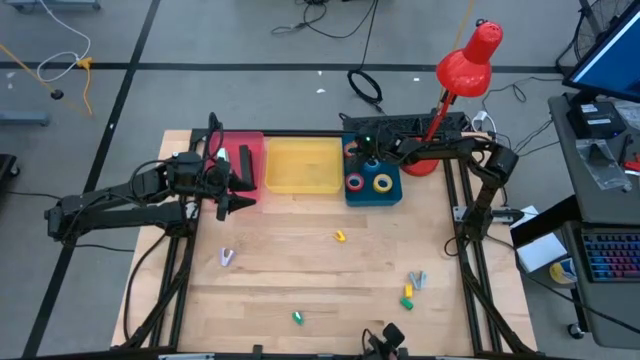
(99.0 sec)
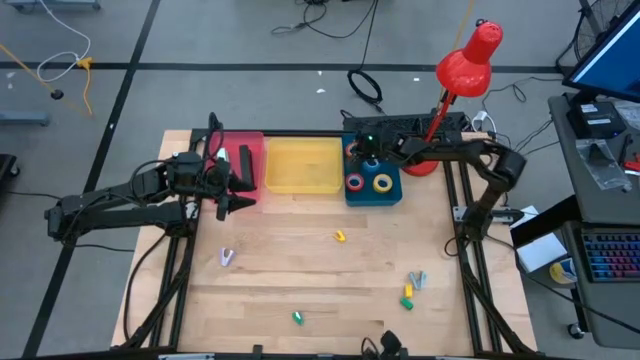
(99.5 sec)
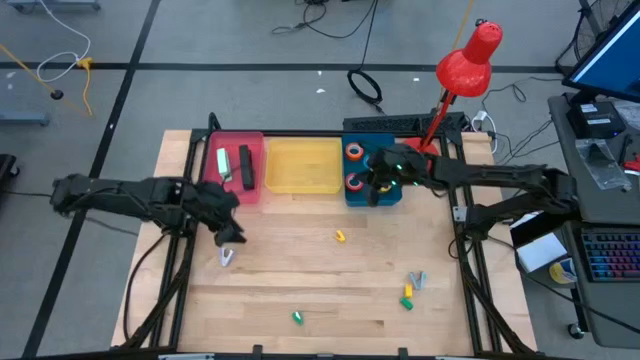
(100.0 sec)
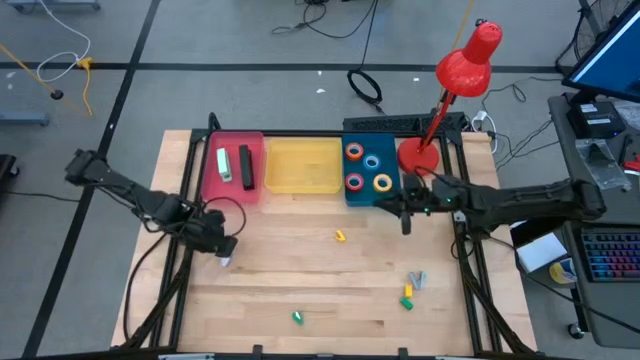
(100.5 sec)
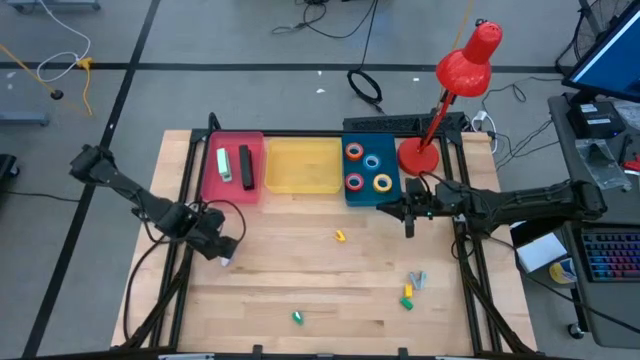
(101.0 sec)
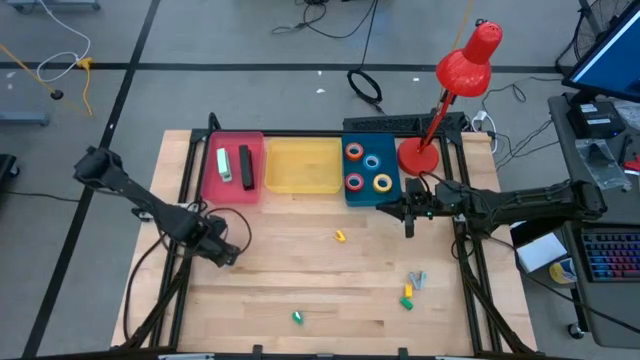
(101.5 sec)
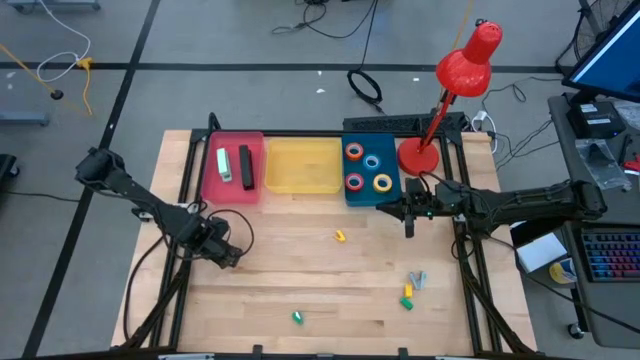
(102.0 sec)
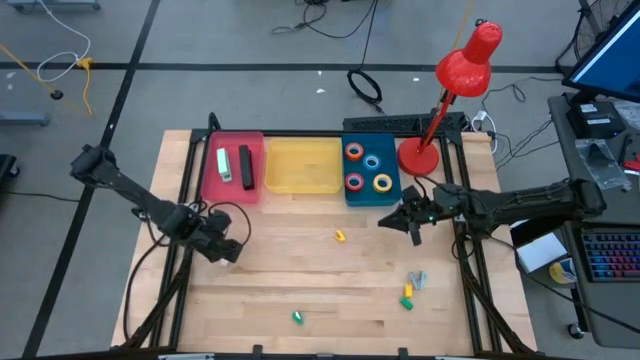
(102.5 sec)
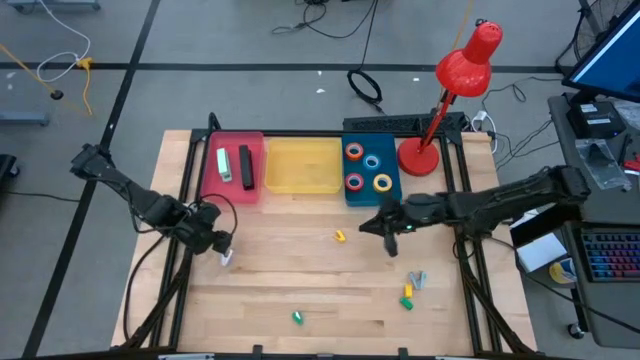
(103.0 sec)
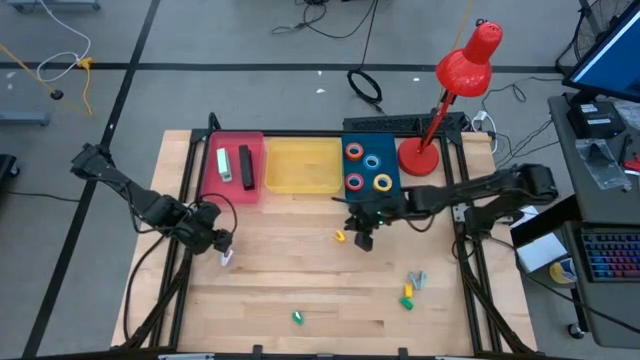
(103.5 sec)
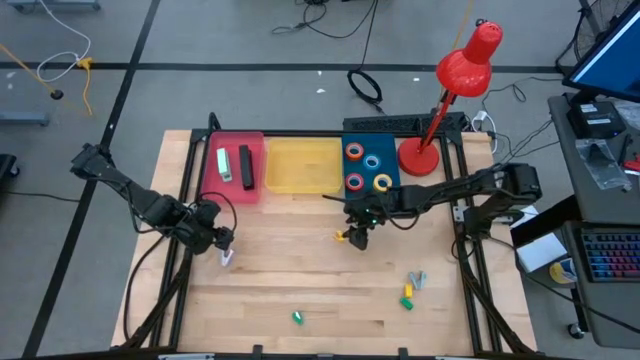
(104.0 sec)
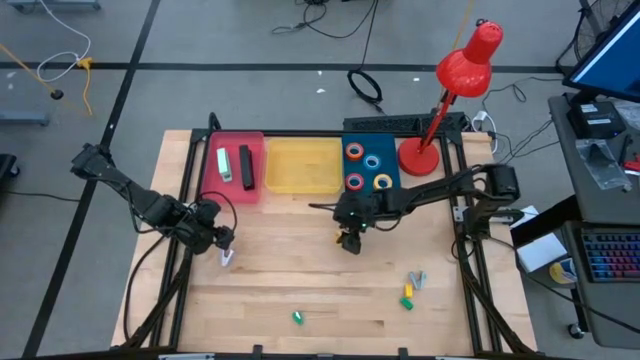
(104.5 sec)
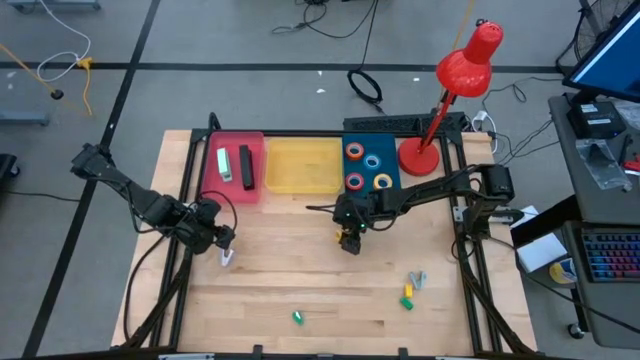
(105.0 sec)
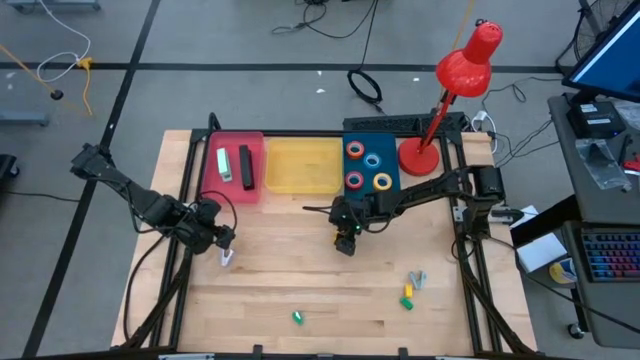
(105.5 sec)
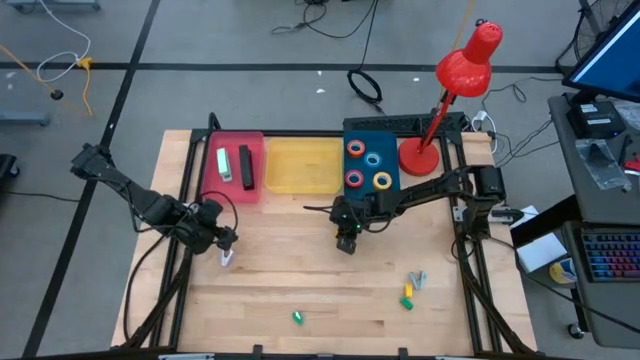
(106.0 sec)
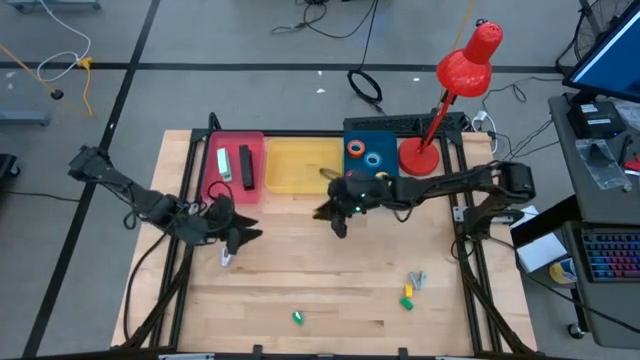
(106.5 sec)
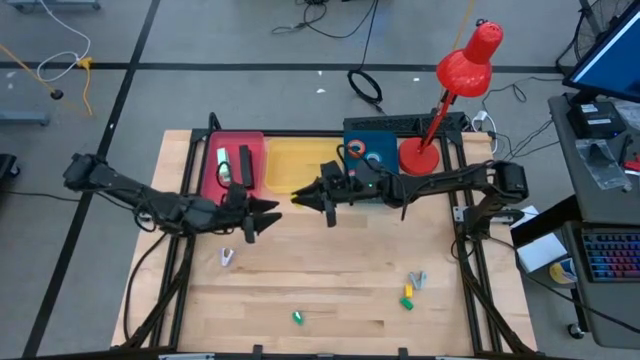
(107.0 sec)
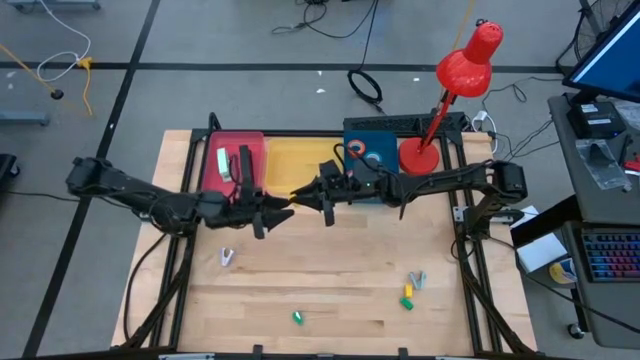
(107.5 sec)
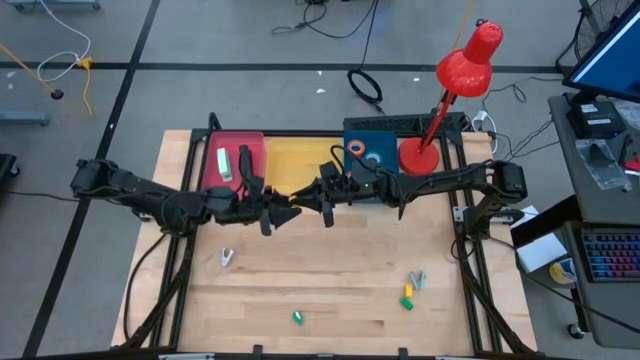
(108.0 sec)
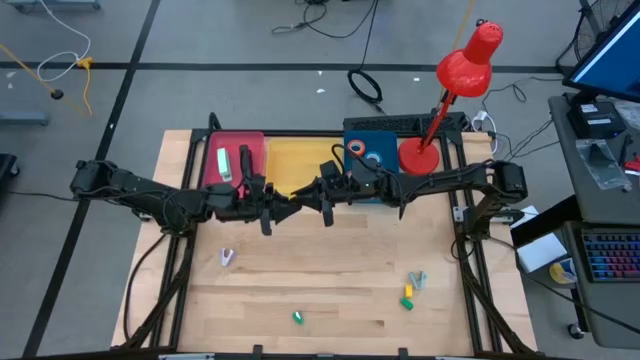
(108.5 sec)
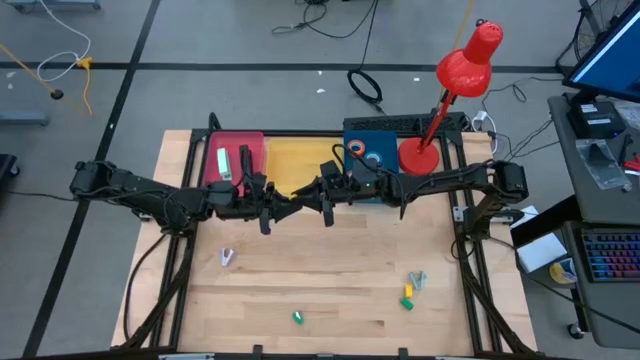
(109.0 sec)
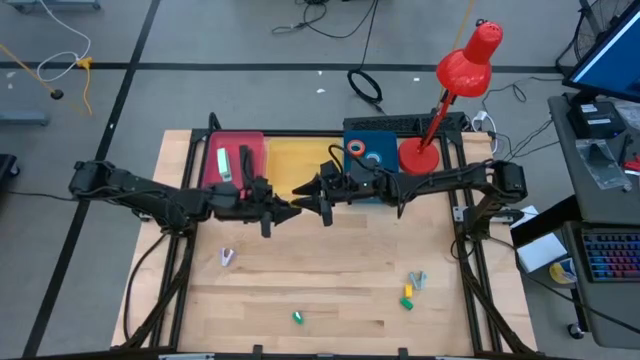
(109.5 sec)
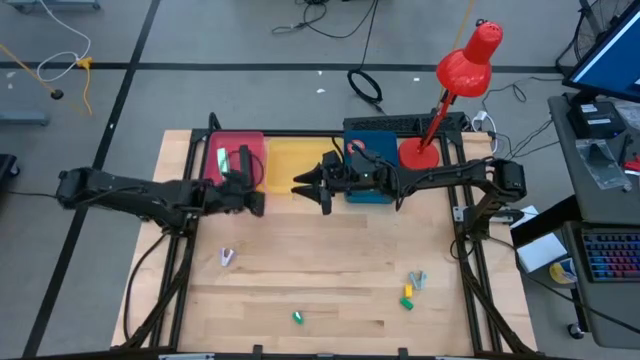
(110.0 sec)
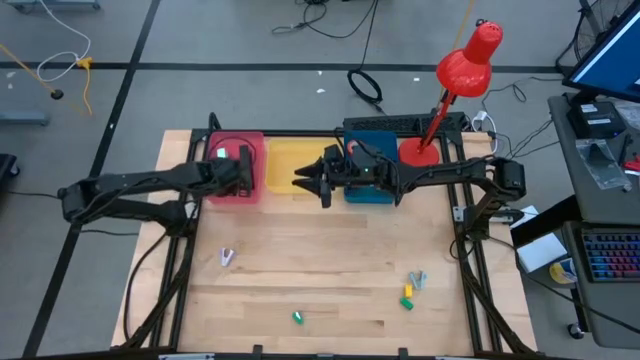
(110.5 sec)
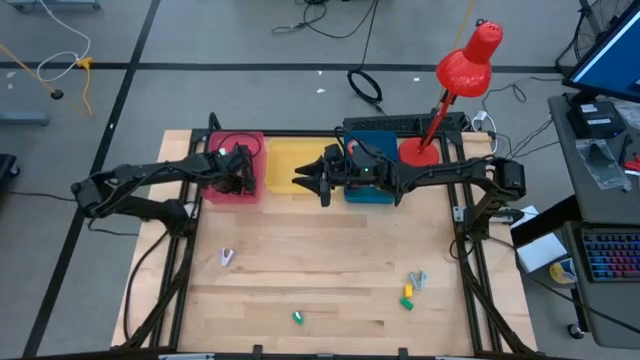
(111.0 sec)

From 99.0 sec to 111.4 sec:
Task: Pick and place Stapler, Stapler remover, tape
Put the top yellow stapler into the red bin

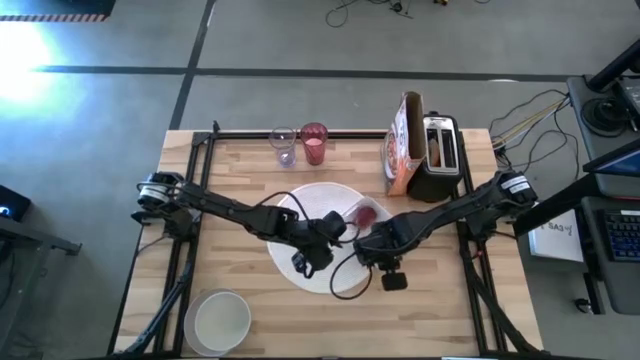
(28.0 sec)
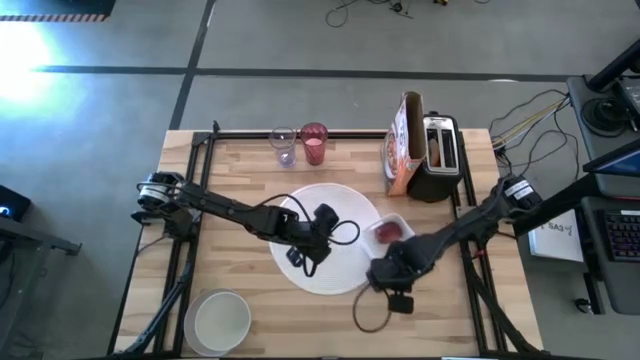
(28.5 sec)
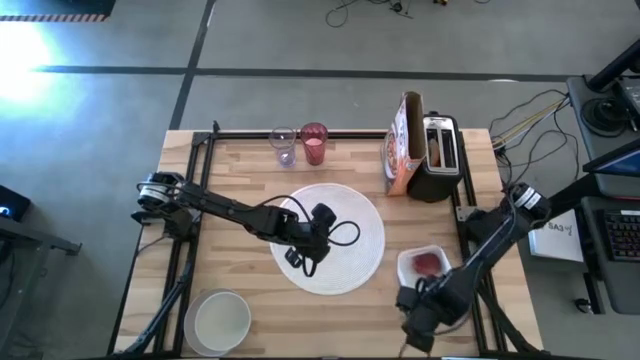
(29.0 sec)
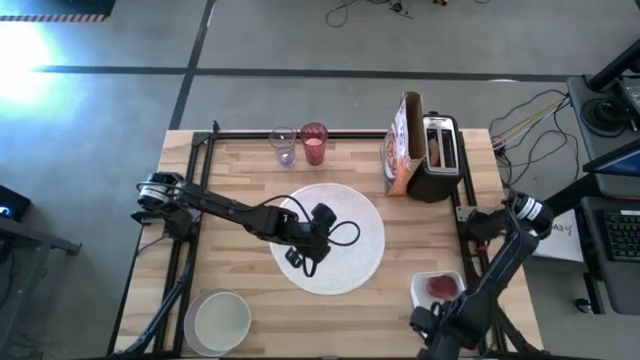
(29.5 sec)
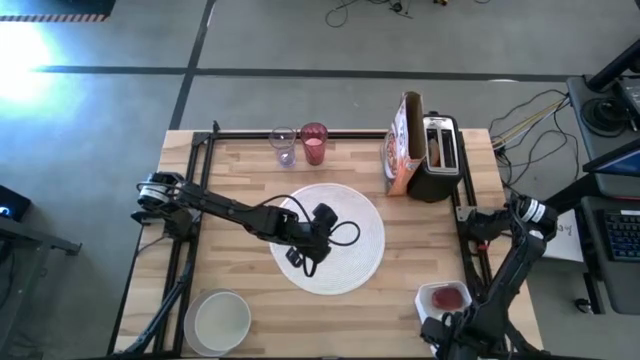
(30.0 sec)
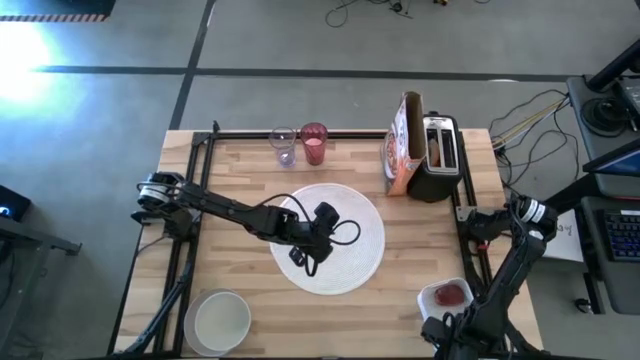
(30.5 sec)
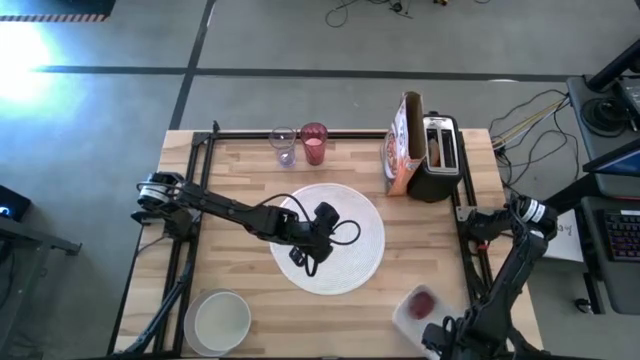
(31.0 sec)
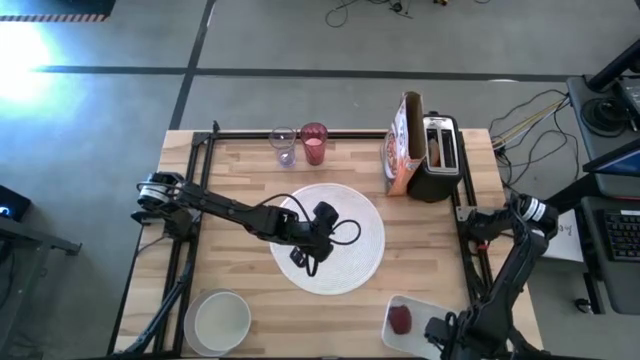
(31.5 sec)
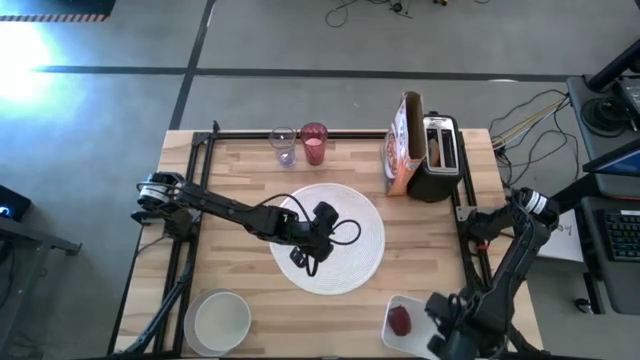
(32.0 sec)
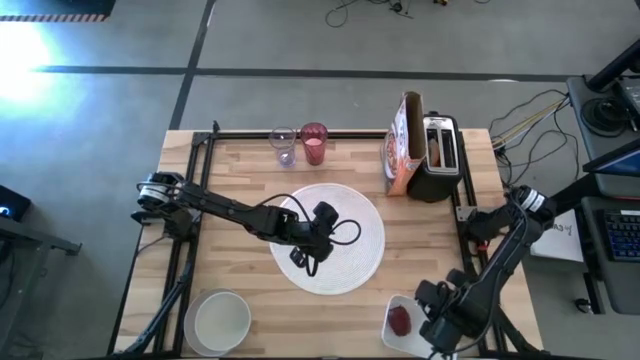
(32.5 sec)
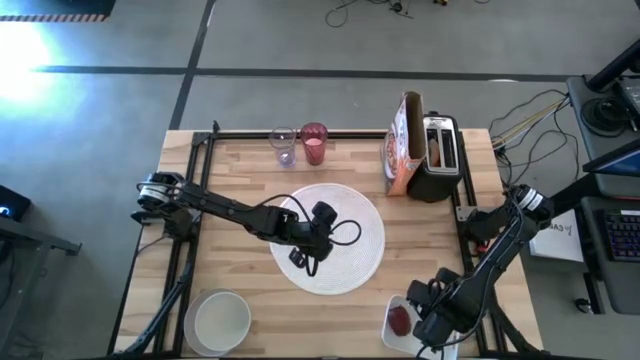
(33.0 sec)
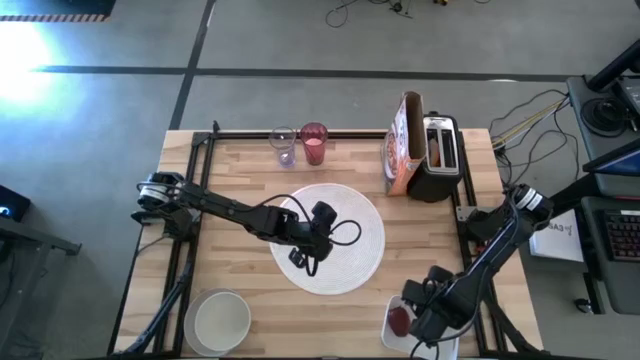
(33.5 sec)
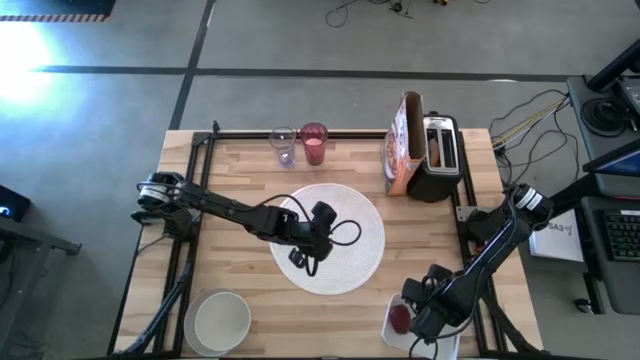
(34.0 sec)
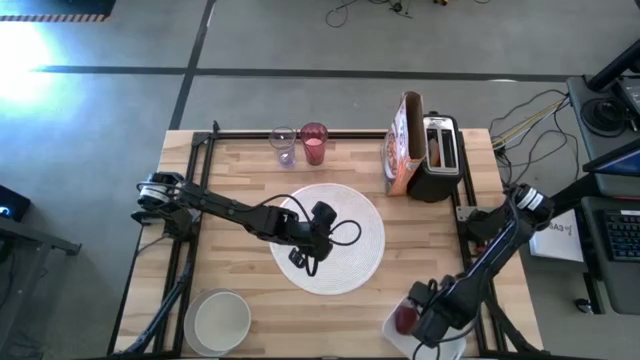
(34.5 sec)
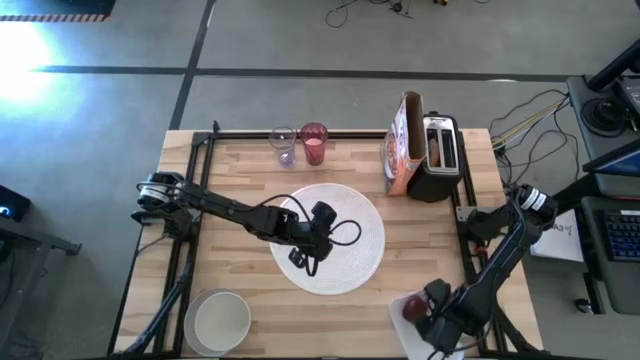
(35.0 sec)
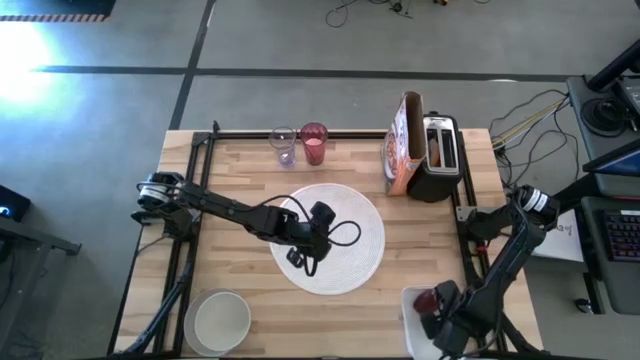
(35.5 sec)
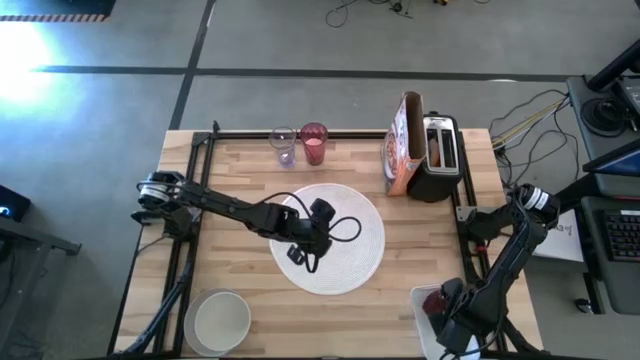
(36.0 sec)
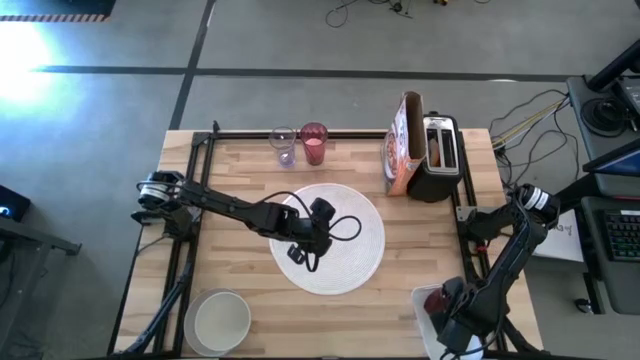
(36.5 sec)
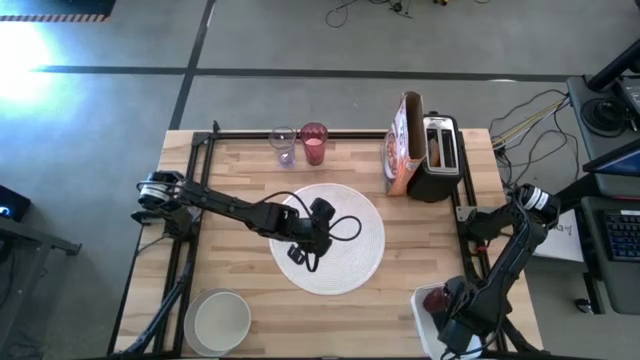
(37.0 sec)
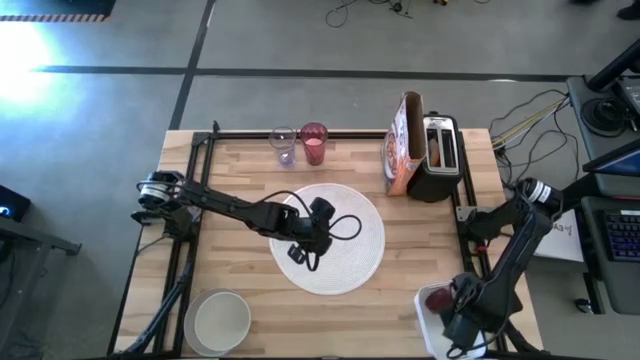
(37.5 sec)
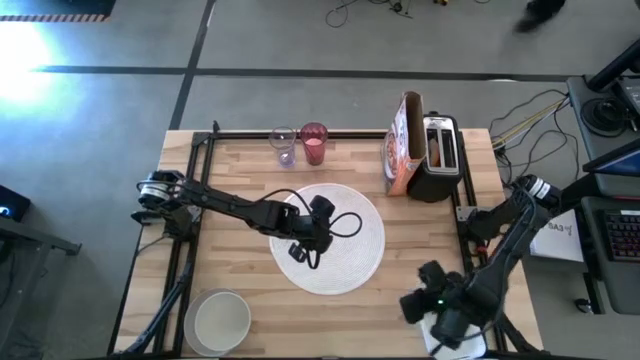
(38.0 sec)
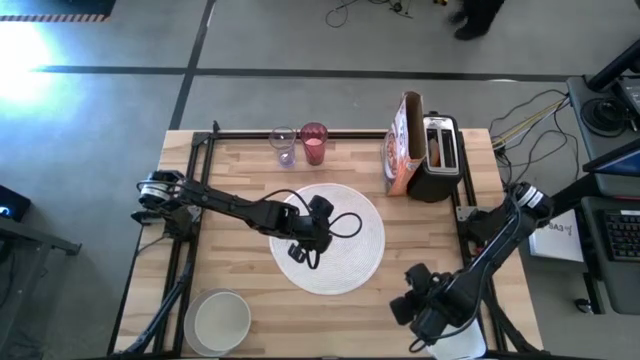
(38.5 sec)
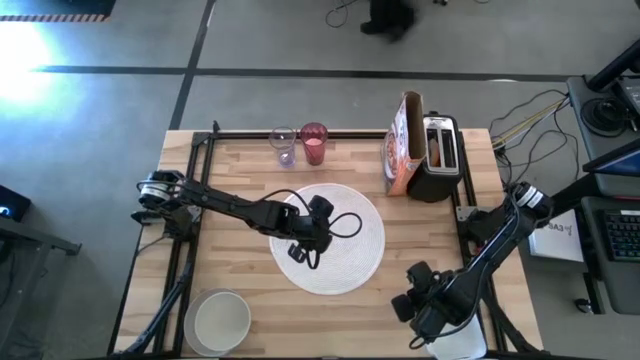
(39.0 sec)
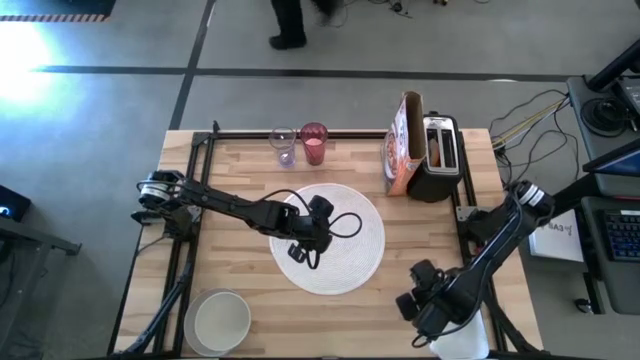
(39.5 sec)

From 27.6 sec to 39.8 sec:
Task: Arrange a breakfast setting
Move the white bin to the bottom right of the table
